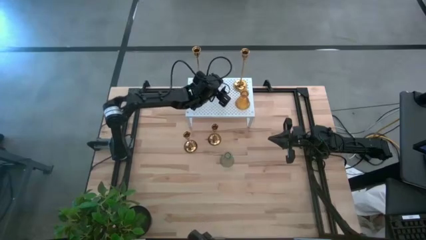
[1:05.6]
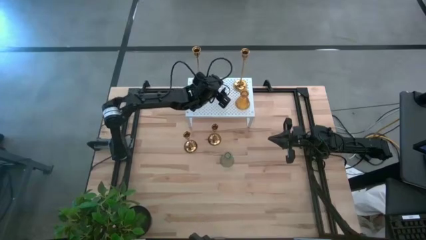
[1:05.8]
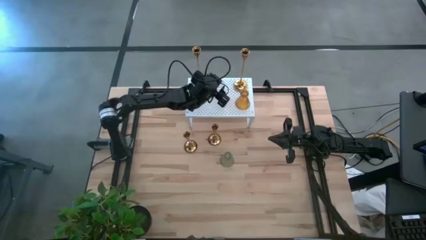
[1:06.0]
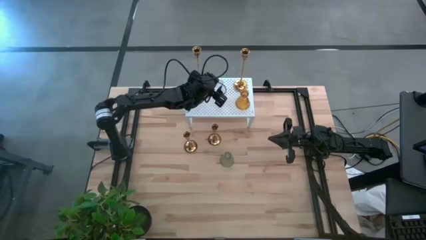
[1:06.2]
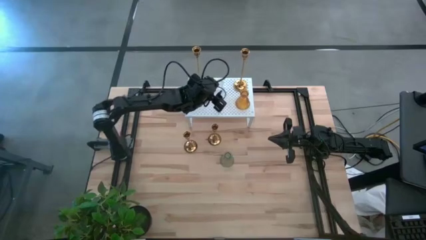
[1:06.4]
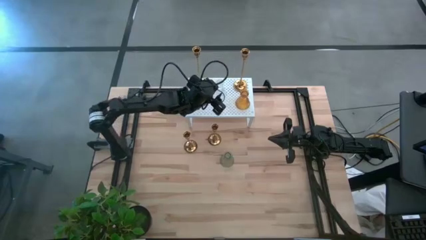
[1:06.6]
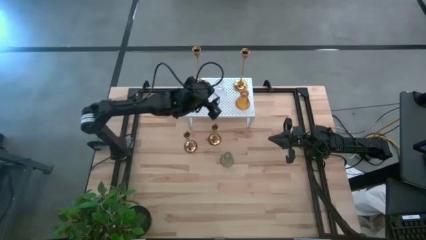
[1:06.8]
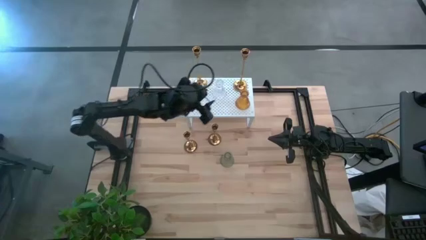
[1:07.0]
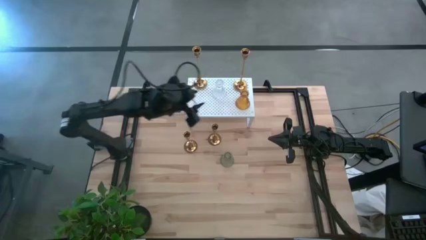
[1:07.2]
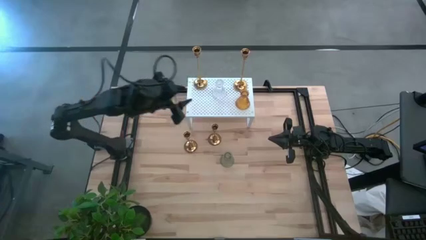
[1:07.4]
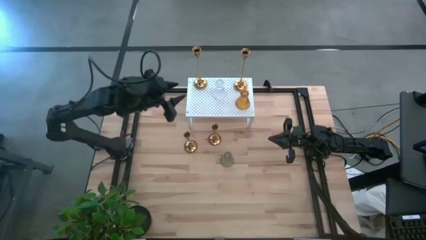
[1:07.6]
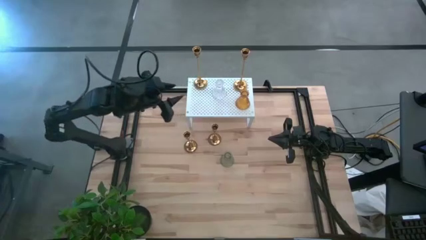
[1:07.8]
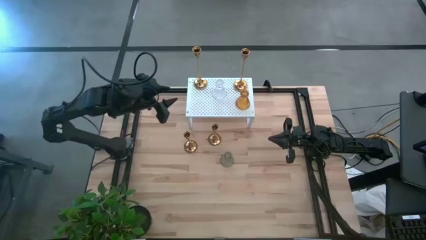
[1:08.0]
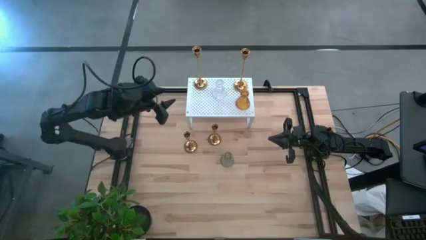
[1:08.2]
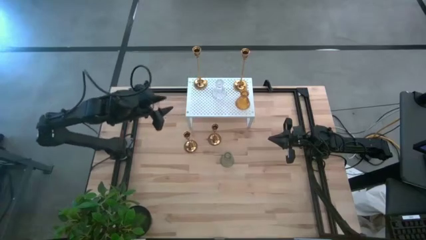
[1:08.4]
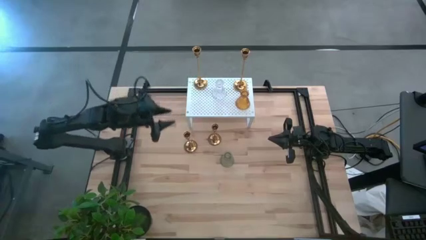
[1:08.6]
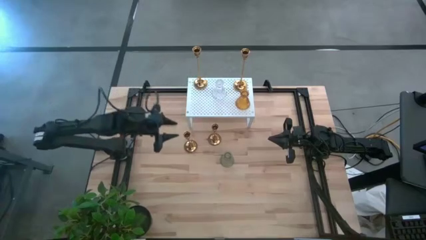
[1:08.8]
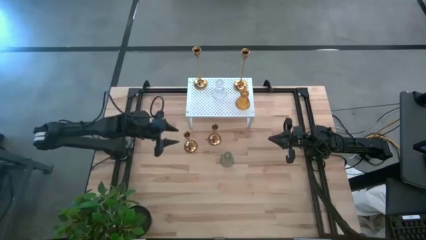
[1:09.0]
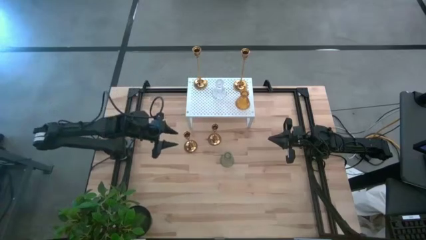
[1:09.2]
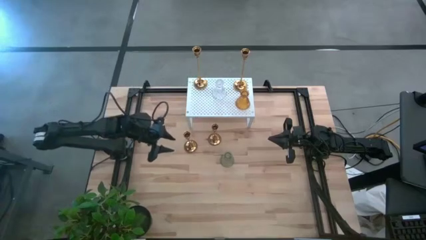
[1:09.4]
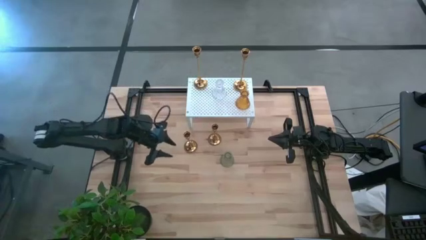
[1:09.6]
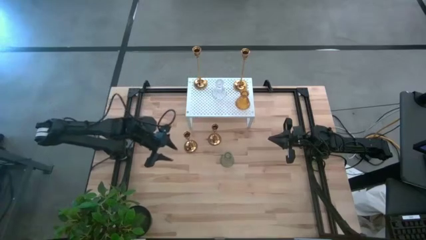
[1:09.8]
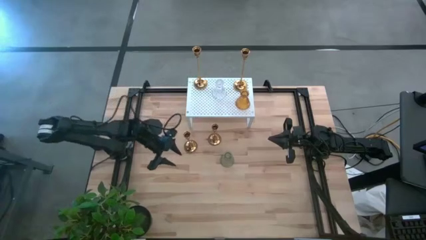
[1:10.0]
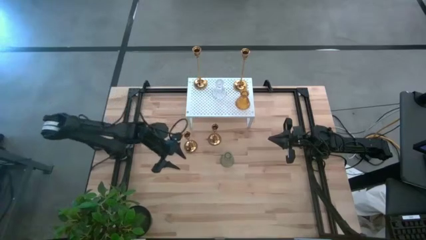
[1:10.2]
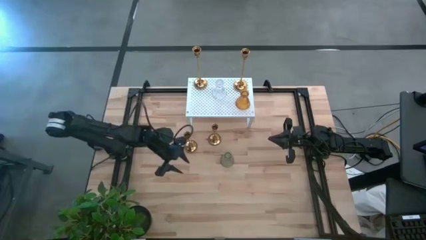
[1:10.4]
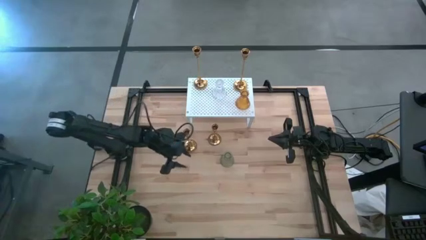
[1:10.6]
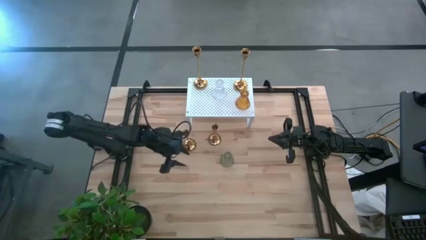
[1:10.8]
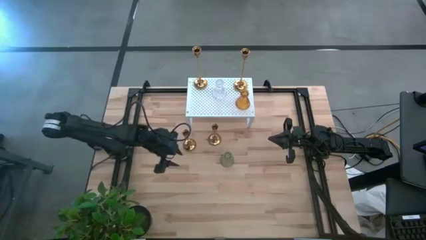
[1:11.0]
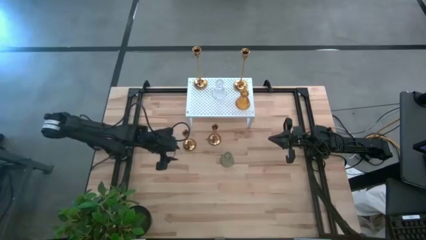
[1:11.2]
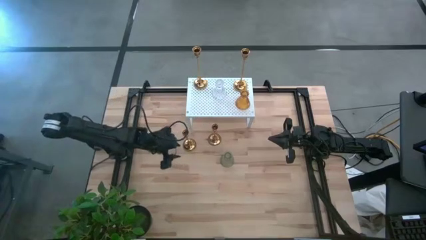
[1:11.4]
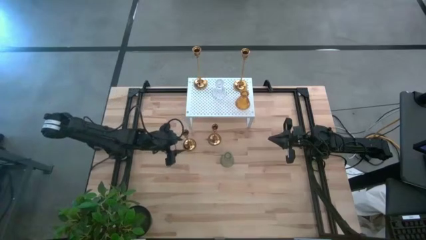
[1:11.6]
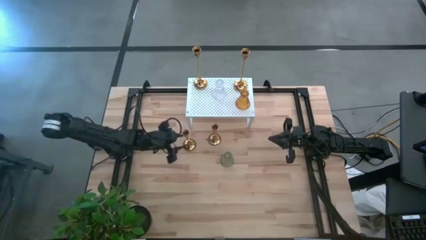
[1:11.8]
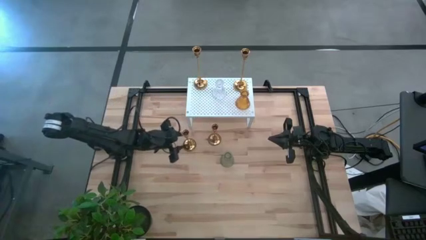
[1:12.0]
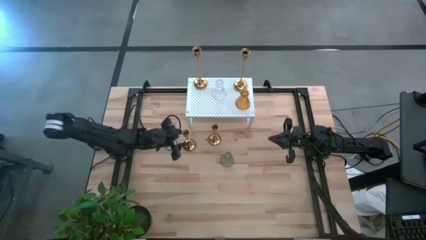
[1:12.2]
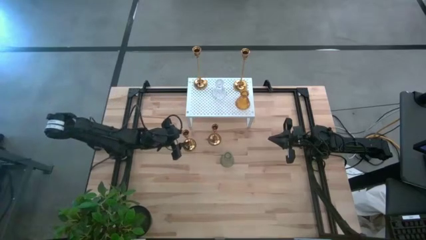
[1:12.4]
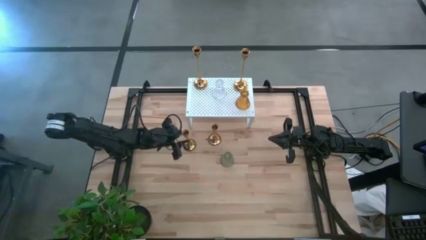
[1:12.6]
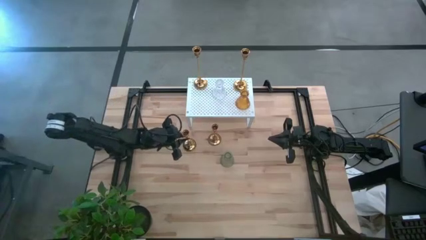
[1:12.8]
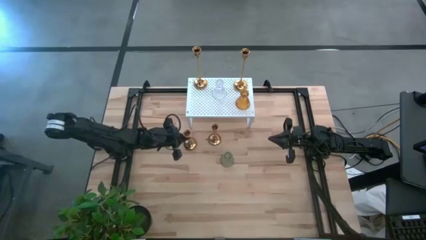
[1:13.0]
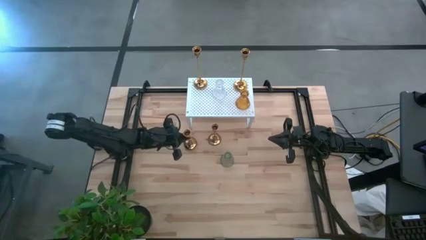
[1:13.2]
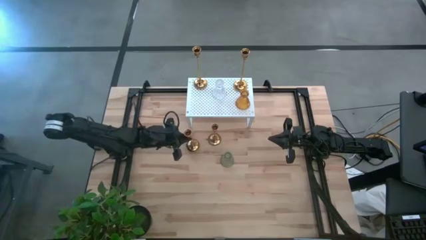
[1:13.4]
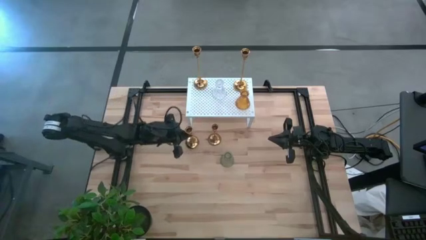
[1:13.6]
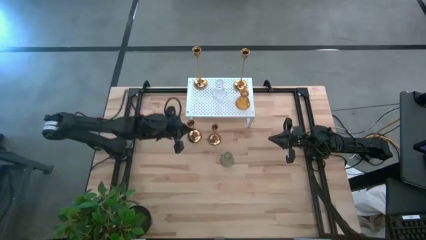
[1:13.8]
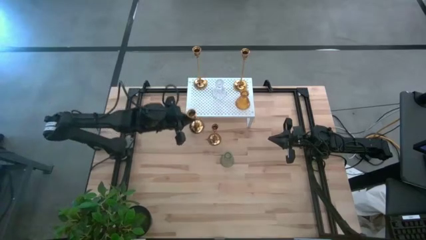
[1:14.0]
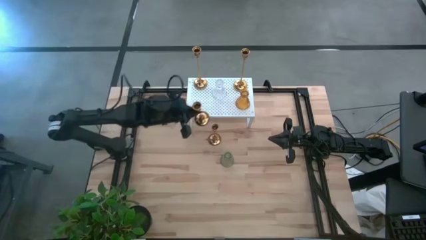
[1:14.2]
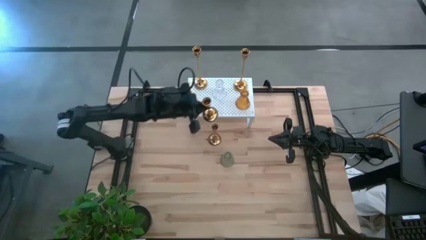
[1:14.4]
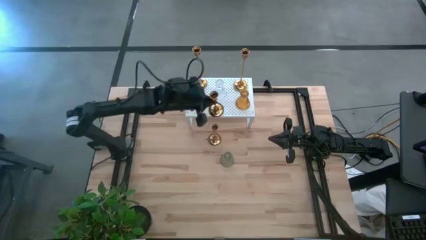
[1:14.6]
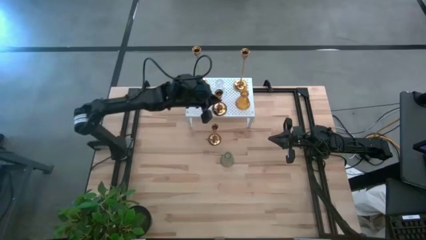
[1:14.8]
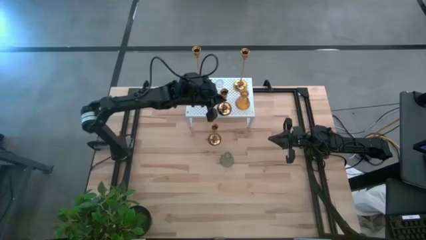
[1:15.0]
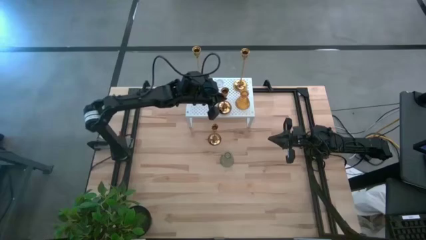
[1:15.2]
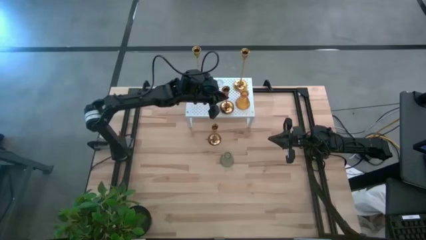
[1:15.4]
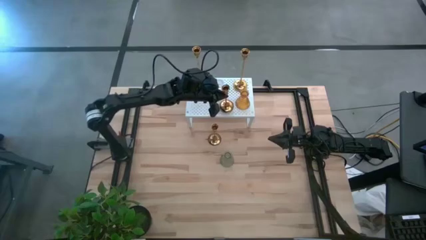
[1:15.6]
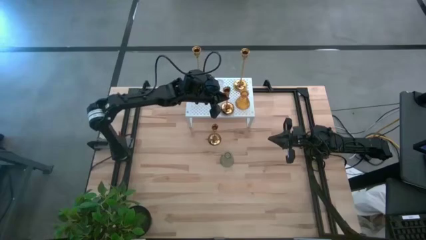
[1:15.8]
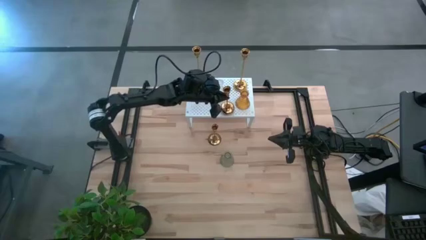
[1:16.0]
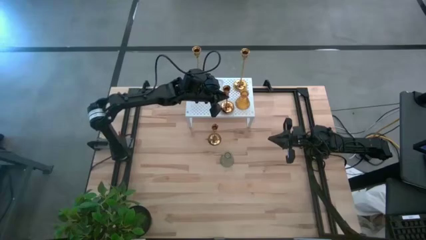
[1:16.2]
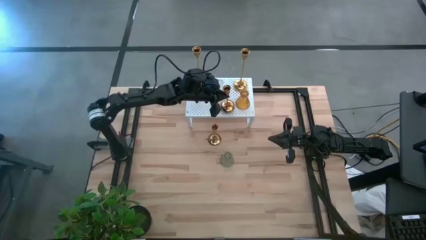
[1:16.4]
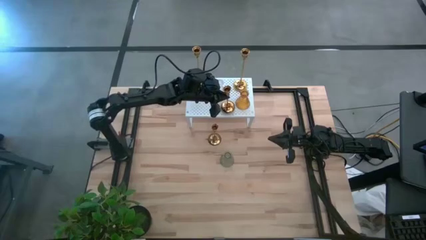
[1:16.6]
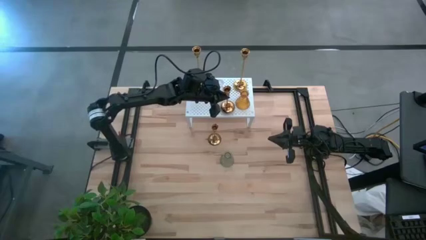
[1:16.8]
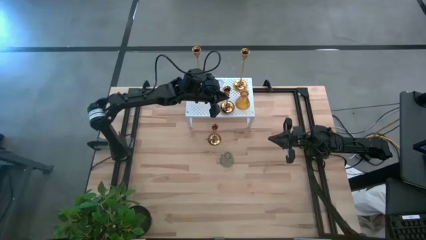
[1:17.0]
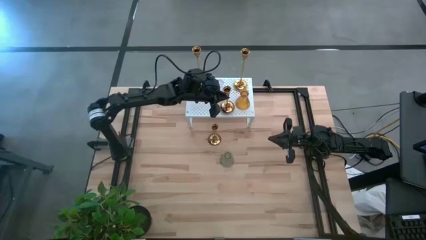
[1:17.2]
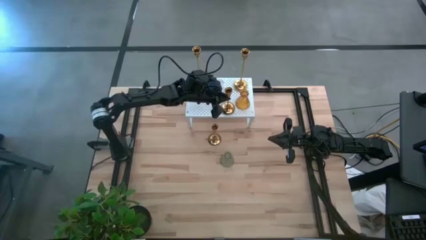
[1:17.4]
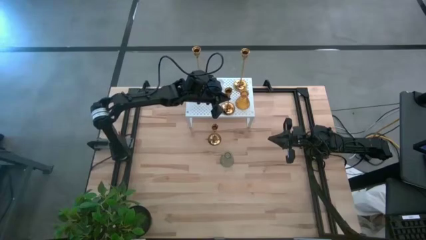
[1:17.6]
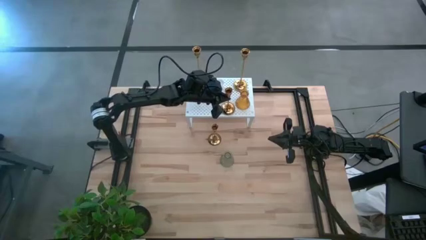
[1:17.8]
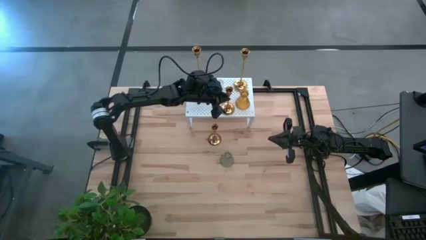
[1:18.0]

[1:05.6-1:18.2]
Task: Pick & Place candle stick holders
Put the left small gold candlestick on the shelf
